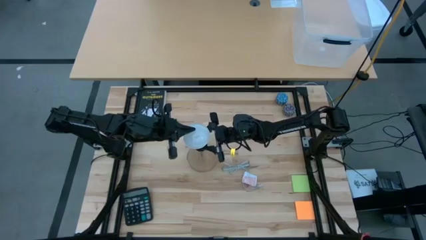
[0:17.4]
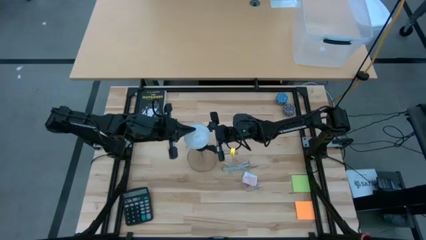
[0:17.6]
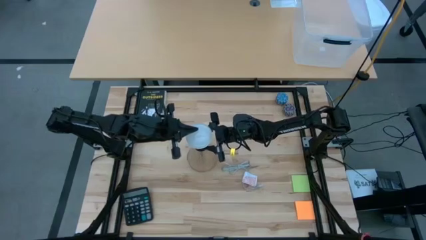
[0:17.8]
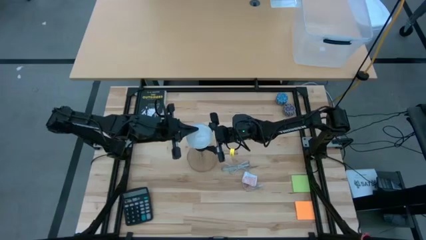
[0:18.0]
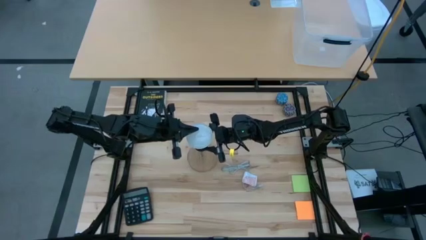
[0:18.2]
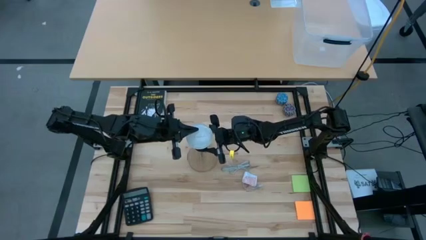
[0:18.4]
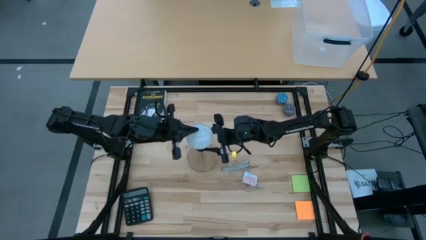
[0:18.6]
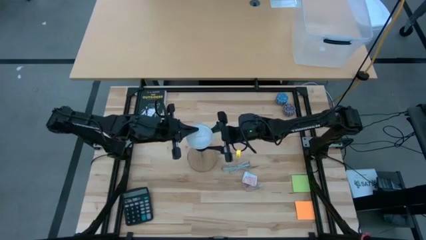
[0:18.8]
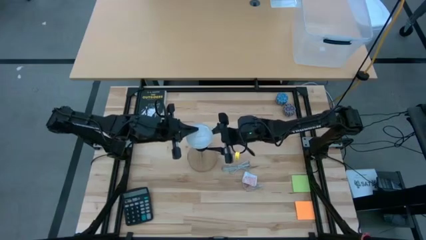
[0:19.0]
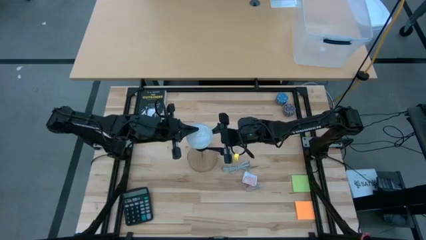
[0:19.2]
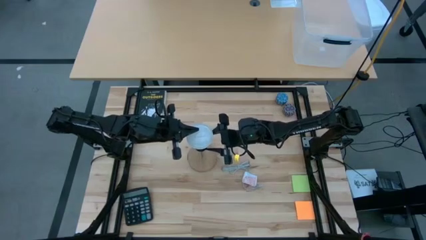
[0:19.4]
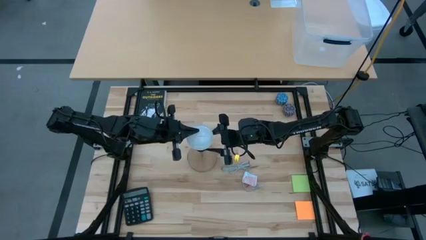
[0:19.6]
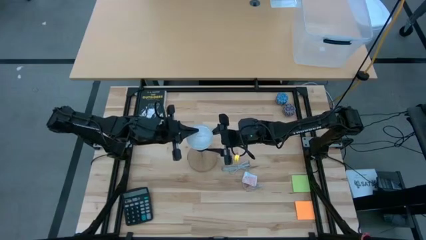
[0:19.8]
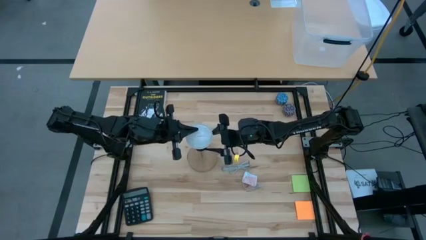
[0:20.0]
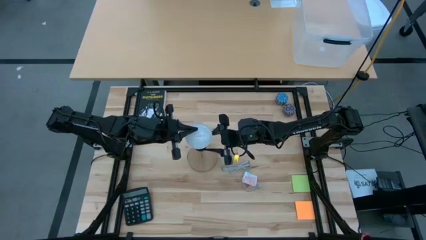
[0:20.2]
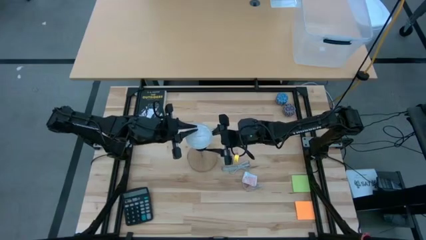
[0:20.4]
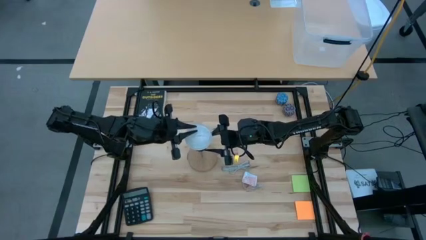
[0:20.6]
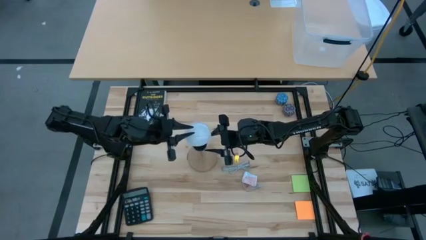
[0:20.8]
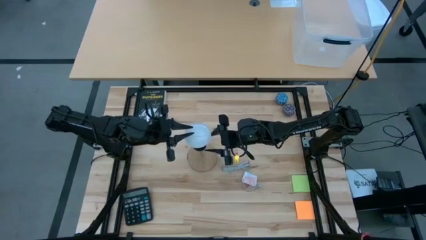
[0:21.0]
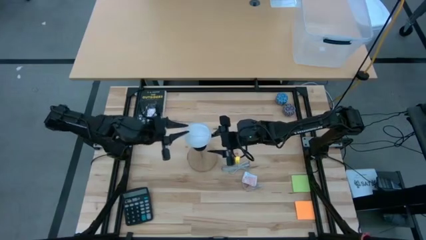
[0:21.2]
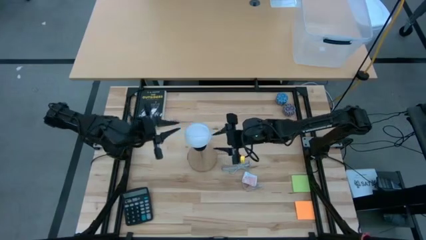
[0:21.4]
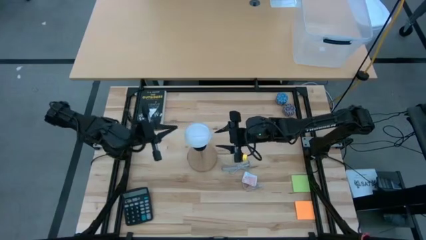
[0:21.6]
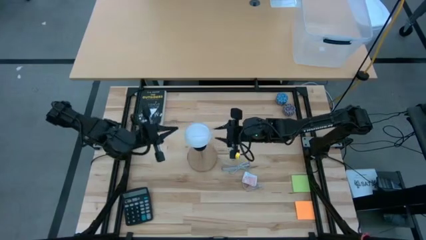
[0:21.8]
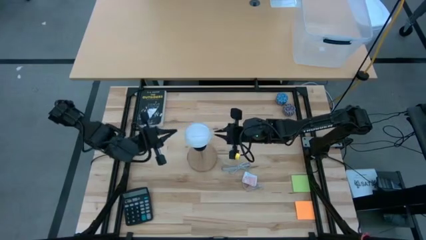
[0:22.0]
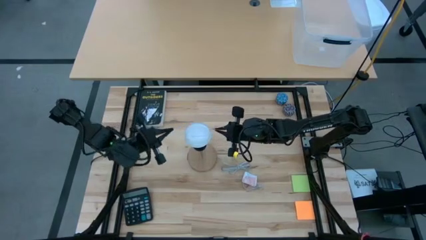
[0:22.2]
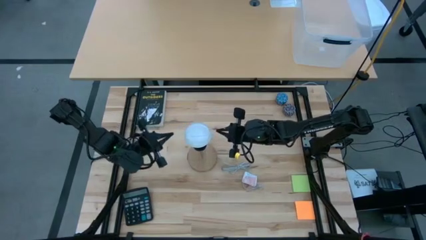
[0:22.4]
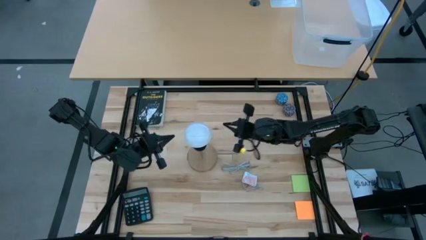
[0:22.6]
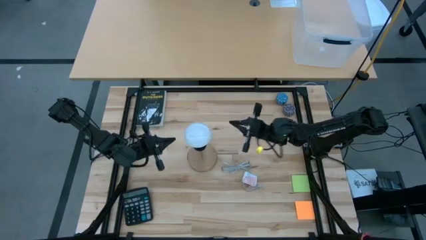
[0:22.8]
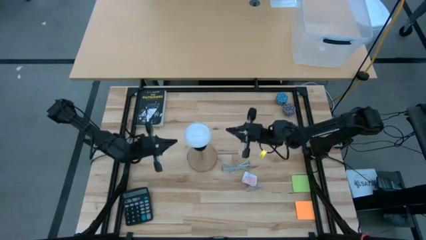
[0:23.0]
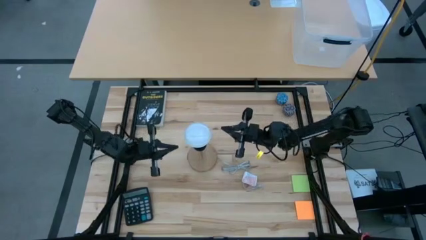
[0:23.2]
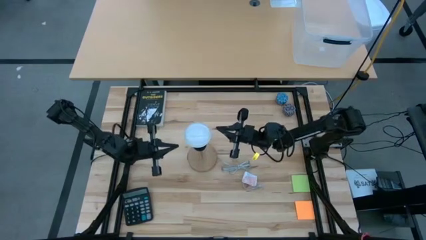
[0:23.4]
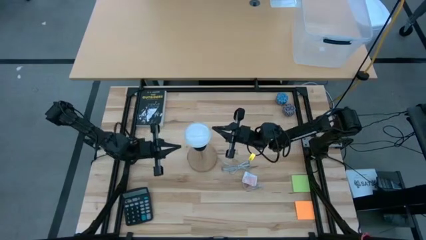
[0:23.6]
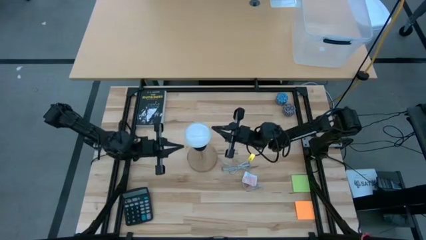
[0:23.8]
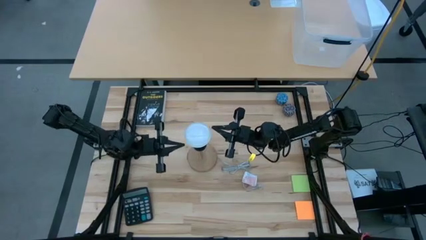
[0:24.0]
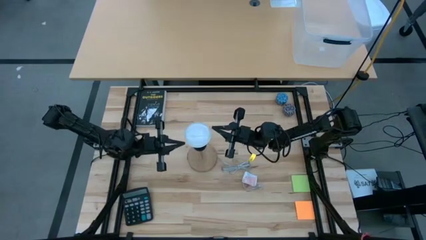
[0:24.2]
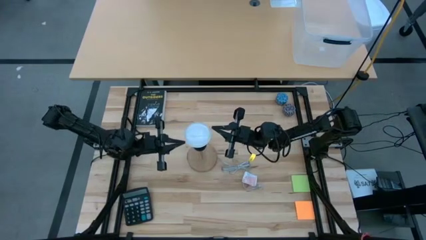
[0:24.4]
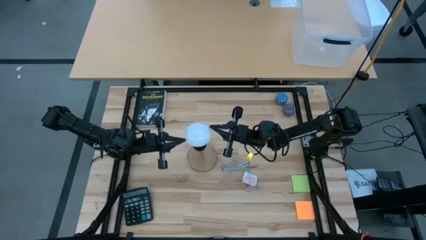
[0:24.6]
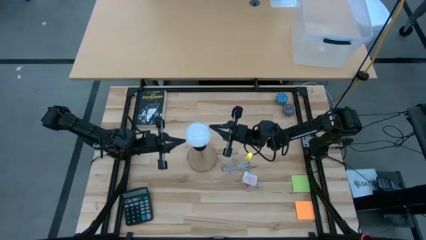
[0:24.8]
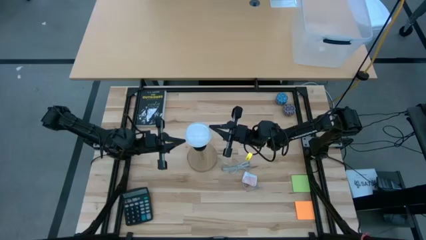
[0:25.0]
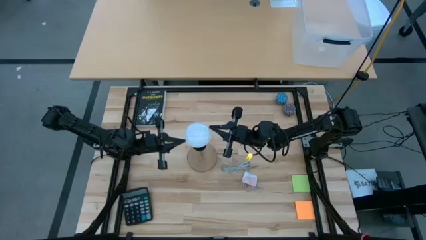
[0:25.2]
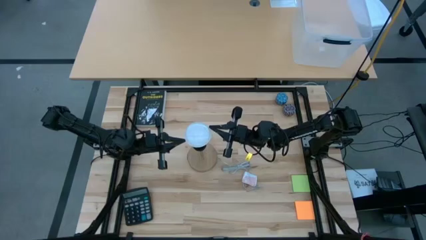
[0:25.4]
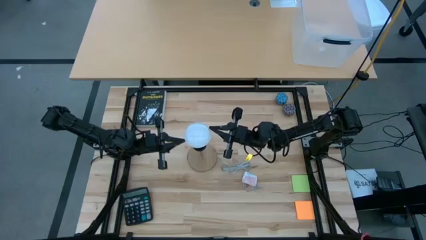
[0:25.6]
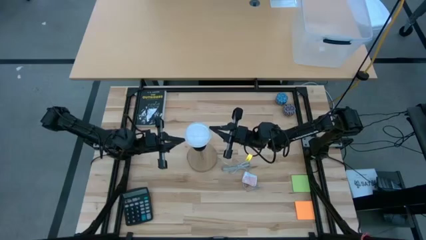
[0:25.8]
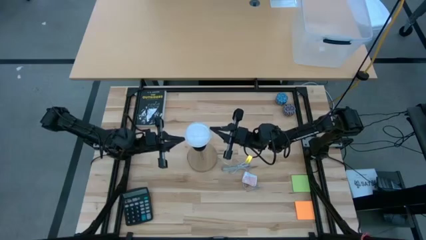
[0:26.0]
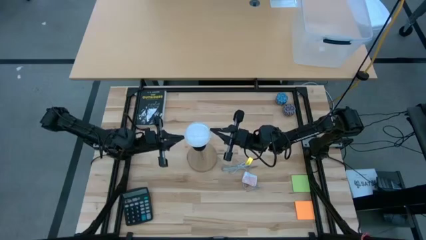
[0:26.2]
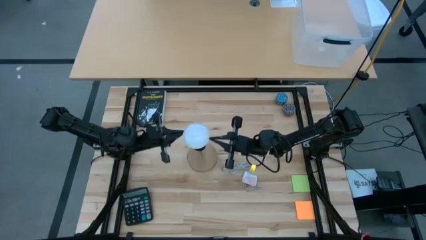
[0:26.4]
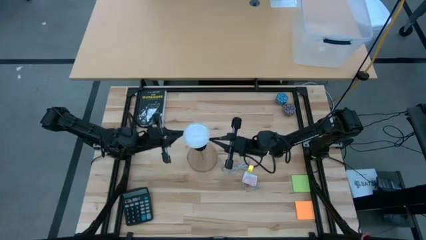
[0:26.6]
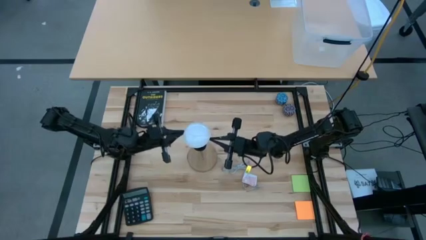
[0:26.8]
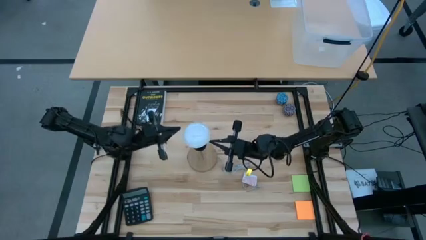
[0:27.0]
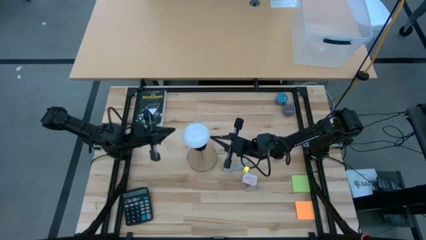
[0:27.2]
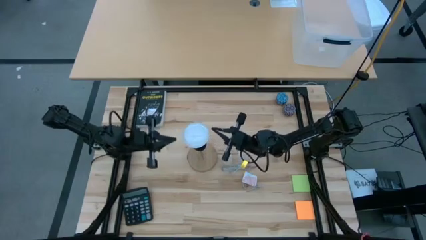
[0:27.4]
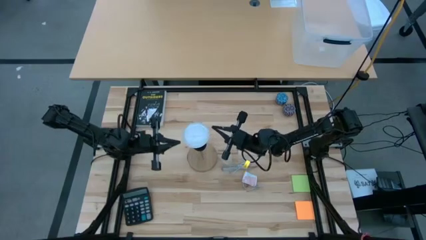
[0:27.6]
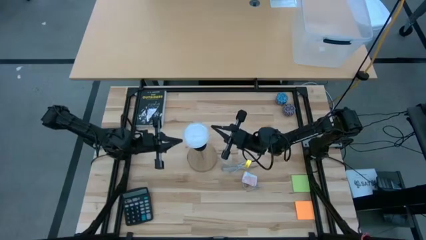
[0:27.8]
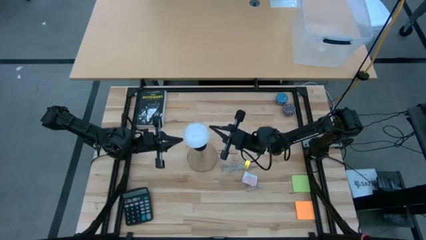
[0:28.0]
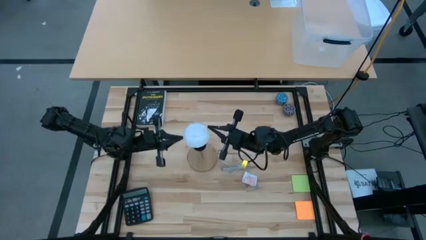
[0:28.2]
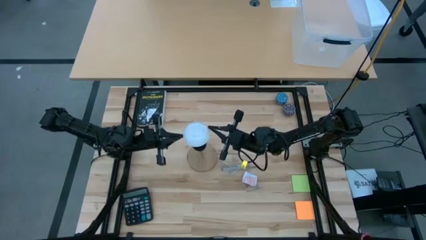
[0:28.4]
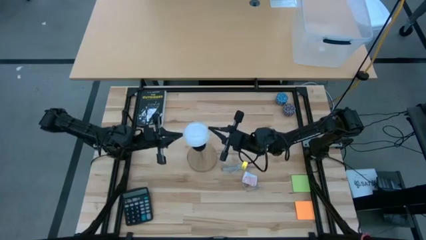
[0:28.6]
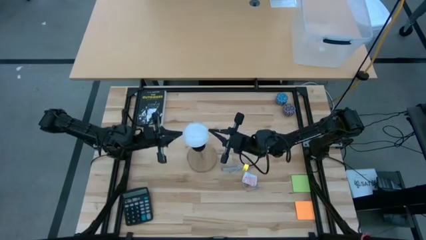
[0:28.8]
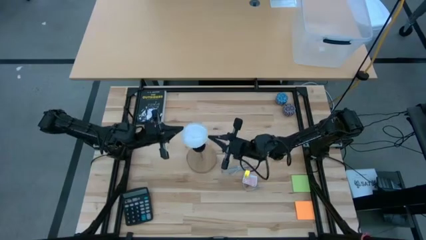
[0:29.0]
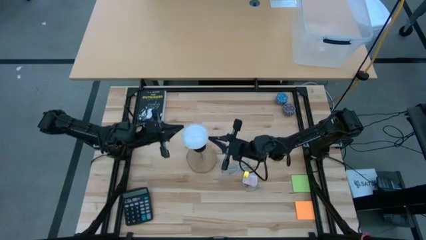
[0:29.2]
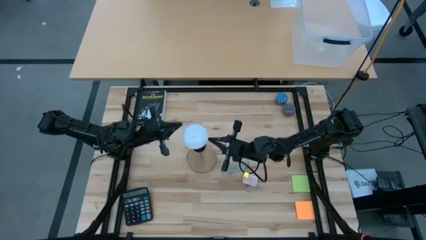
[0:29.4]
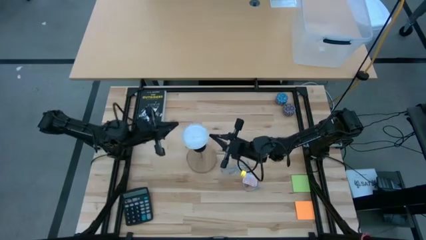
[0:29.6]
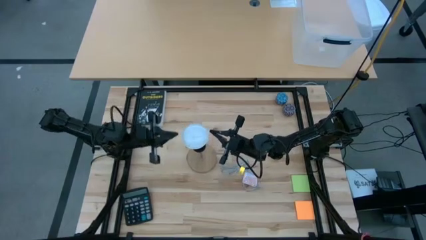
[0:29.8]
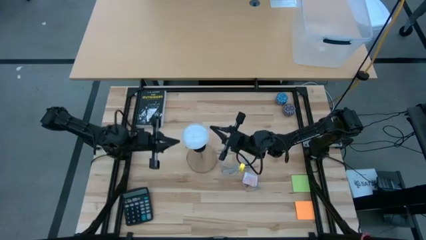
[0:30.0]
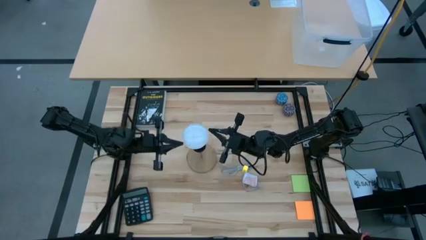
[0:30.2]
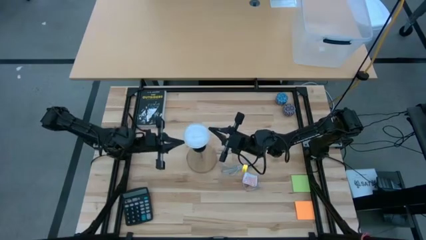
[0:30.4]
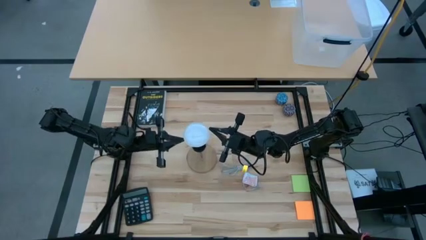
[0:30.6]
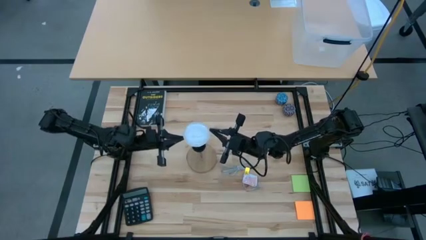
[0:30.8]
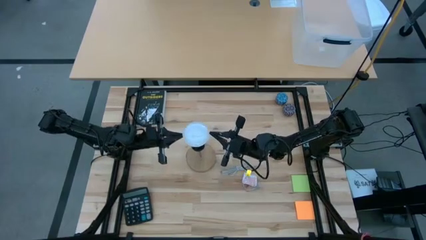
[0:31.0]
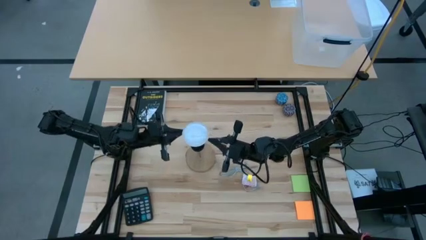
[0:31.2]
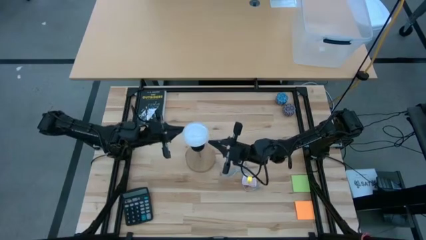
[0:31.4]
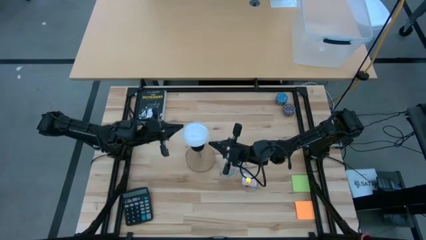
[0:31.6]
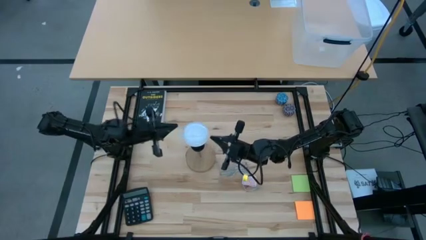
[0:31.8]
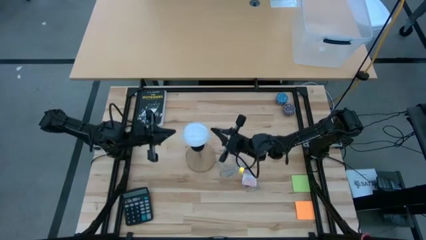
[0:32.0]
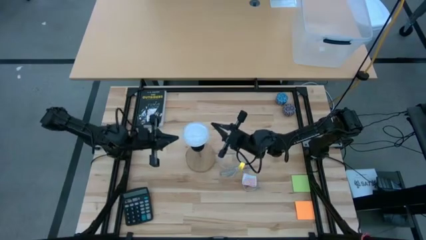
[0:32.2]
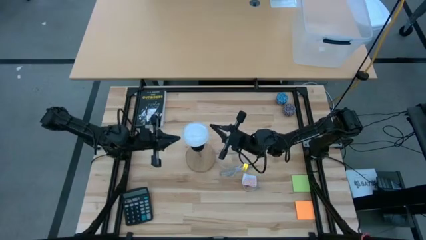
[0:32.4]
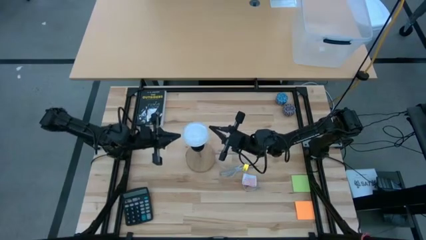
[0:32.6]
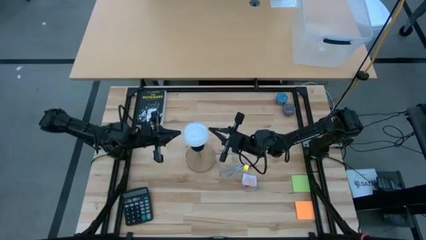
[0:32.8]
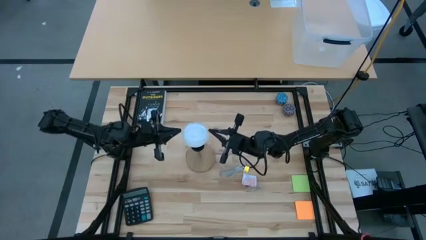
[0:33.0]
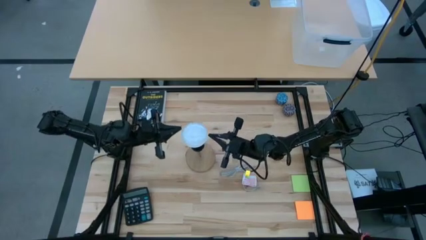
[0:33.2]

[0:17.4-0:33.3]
Task: Screw lightbulb
Insert the lightbulb into the lamp socket
